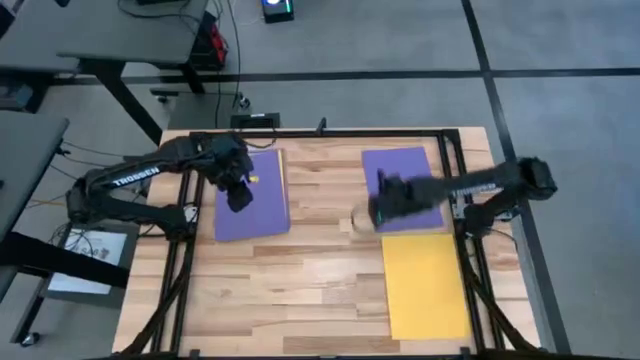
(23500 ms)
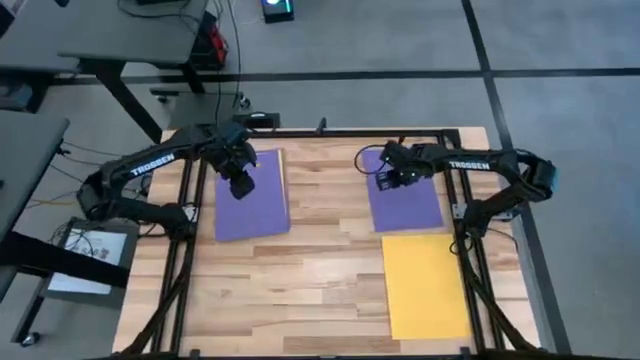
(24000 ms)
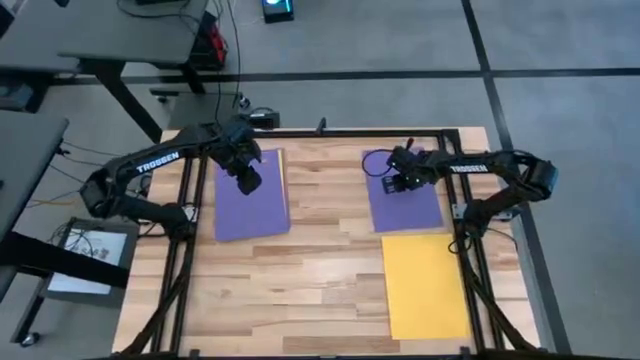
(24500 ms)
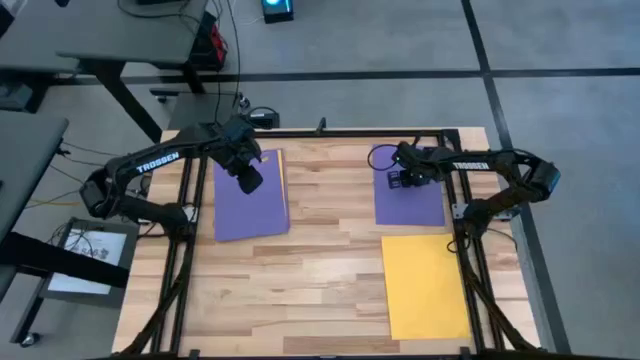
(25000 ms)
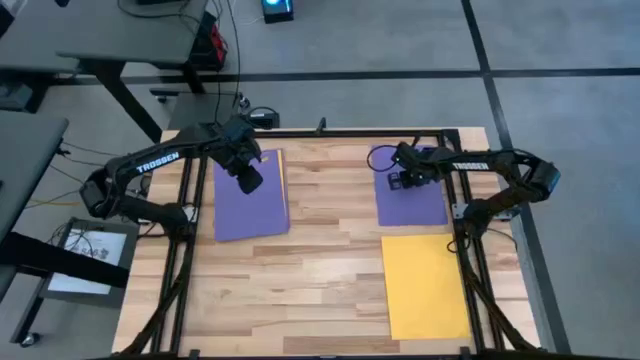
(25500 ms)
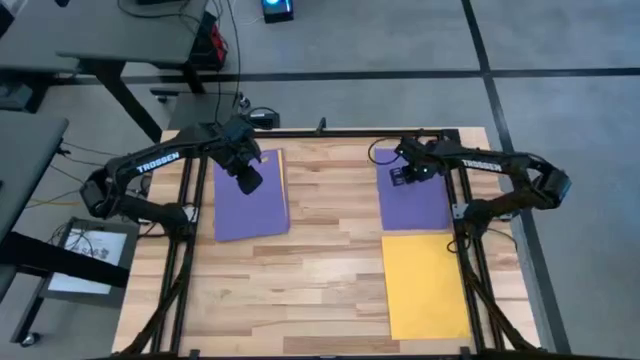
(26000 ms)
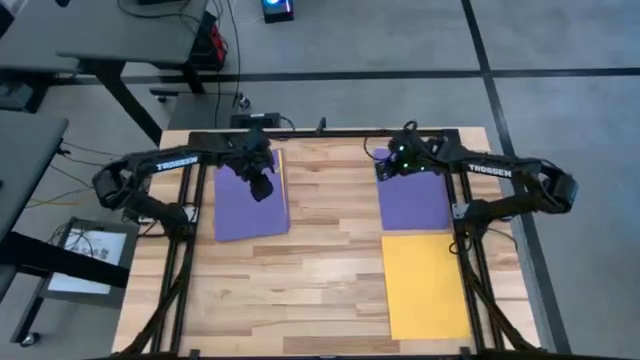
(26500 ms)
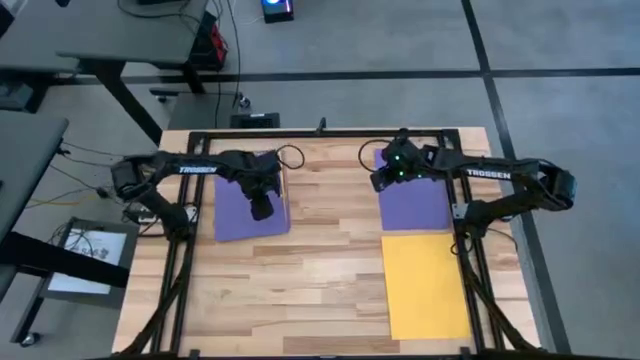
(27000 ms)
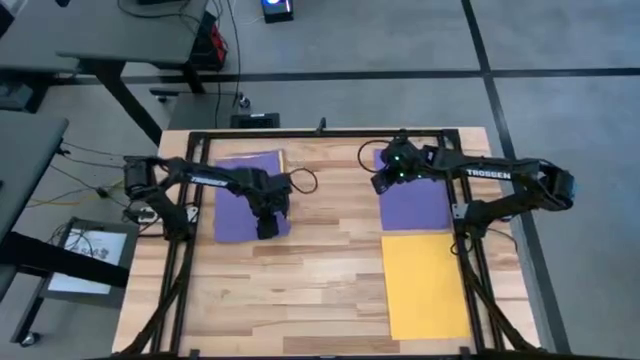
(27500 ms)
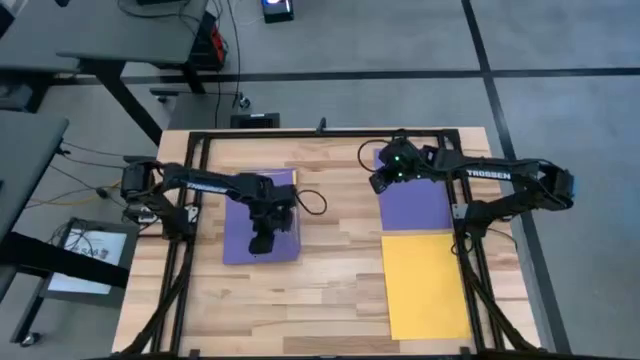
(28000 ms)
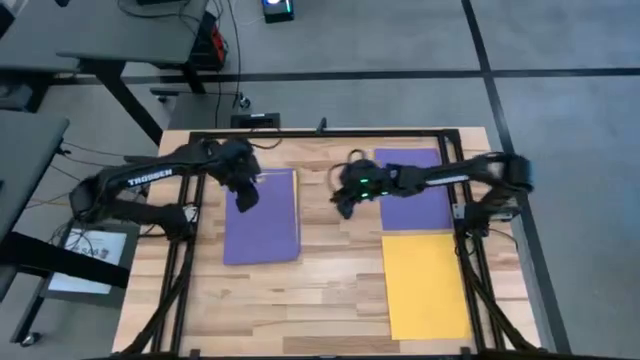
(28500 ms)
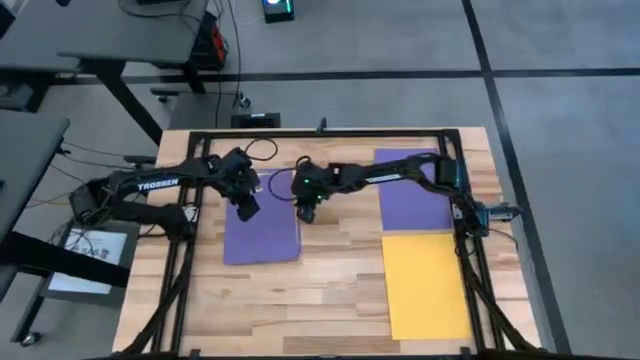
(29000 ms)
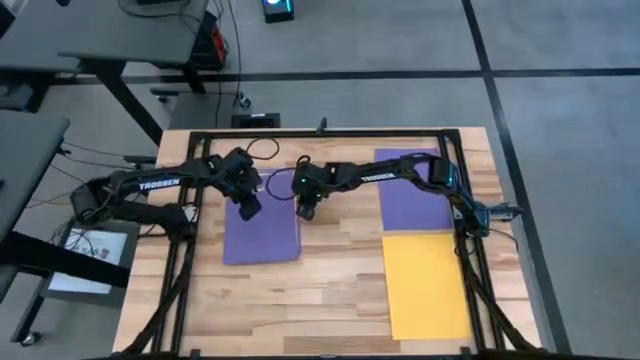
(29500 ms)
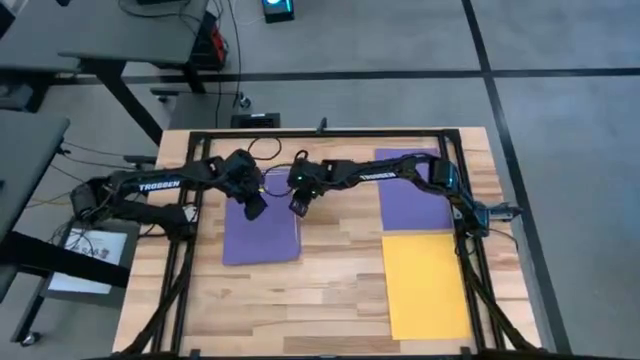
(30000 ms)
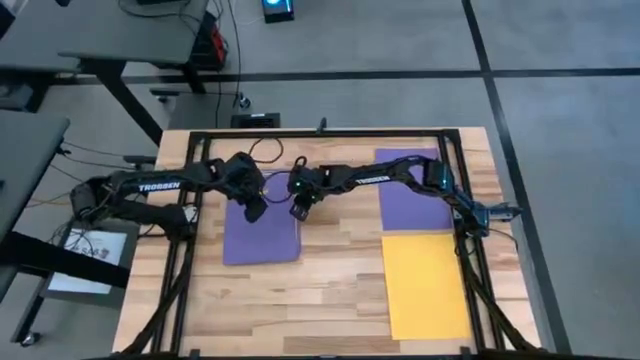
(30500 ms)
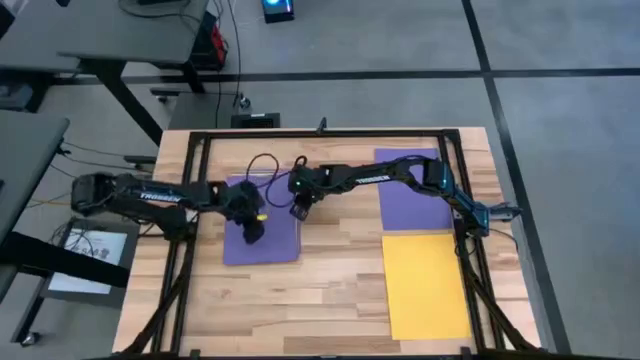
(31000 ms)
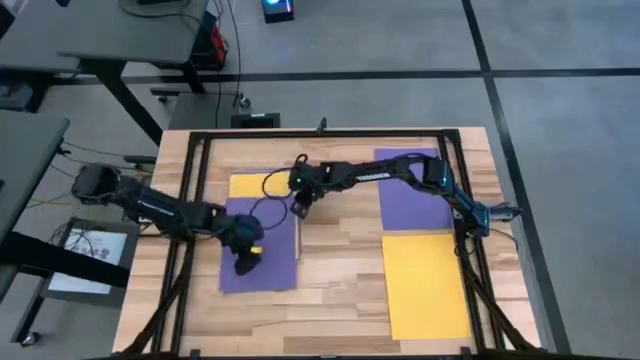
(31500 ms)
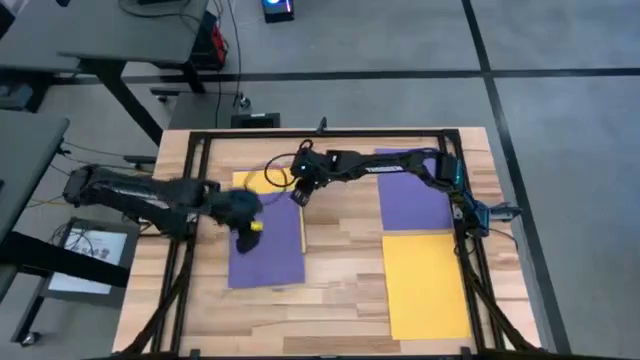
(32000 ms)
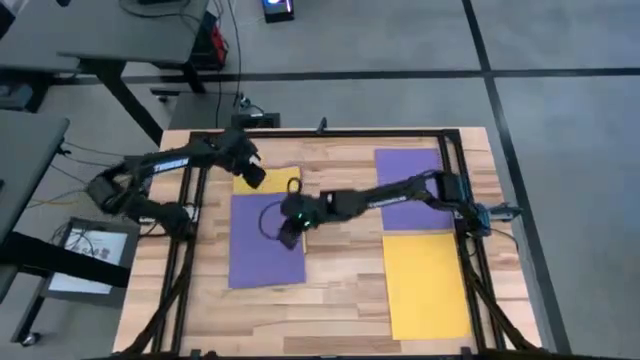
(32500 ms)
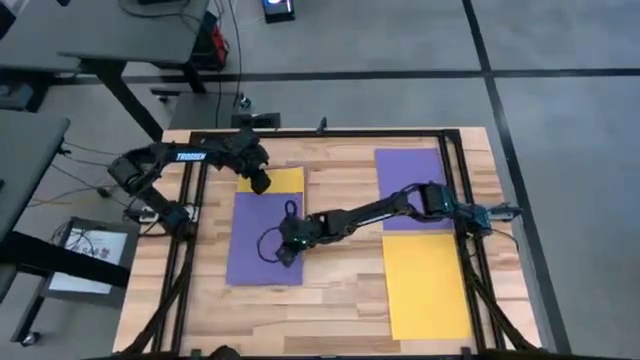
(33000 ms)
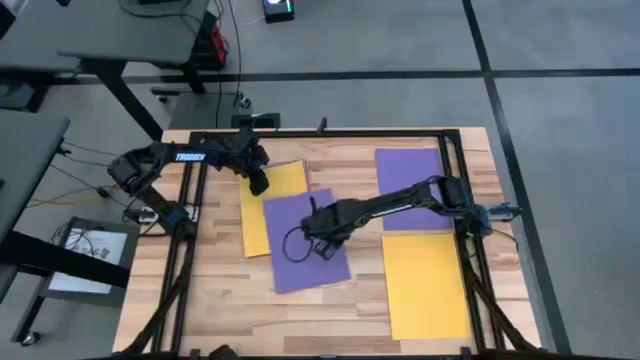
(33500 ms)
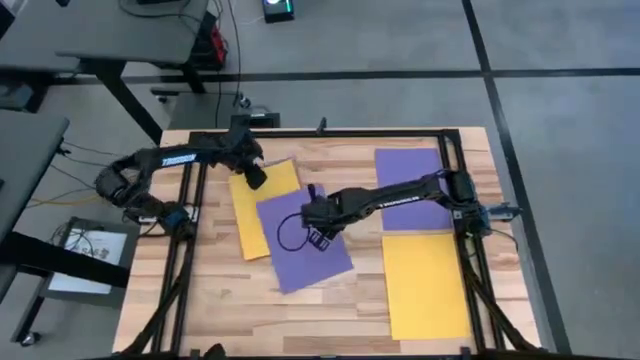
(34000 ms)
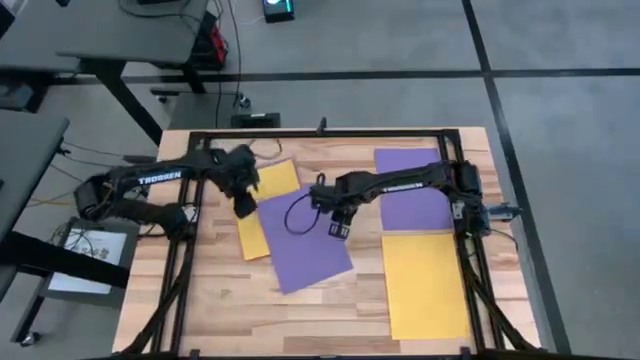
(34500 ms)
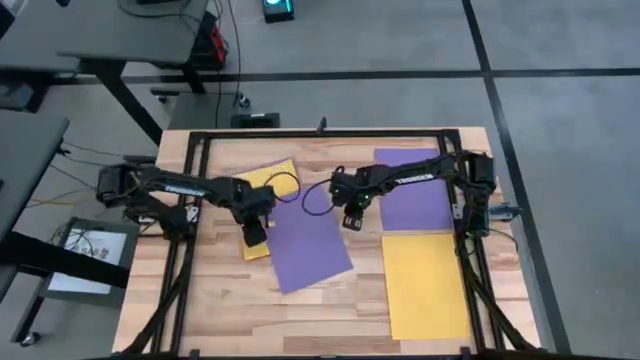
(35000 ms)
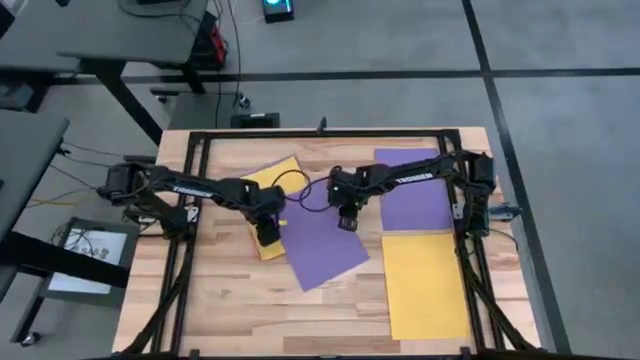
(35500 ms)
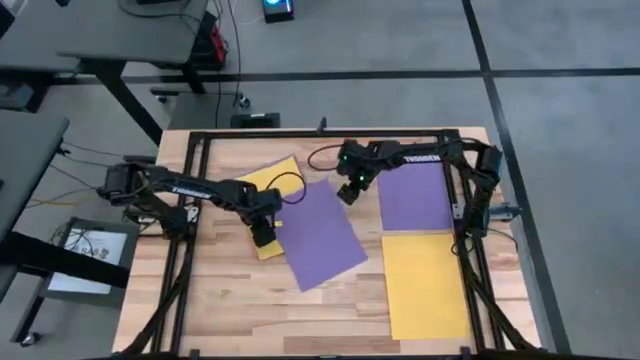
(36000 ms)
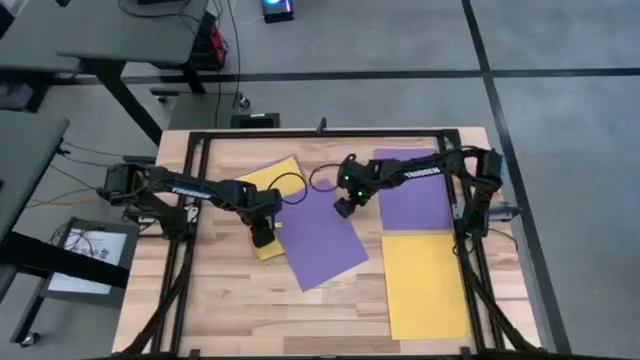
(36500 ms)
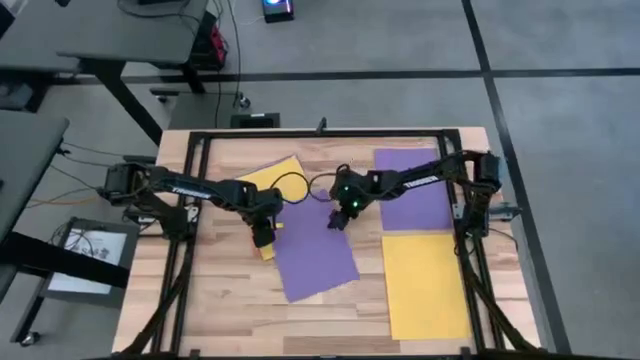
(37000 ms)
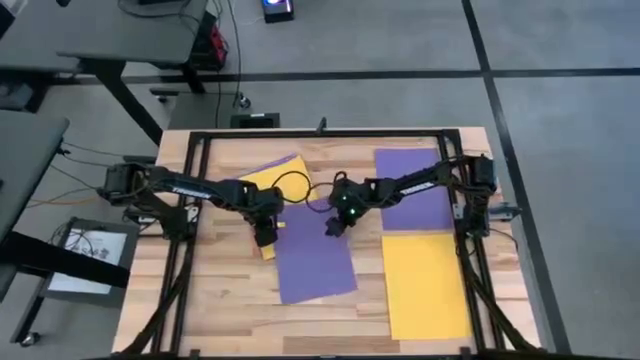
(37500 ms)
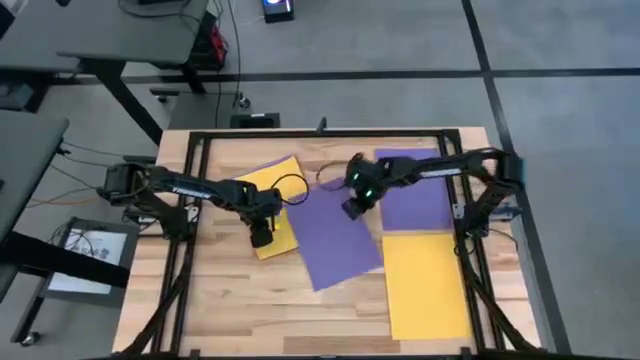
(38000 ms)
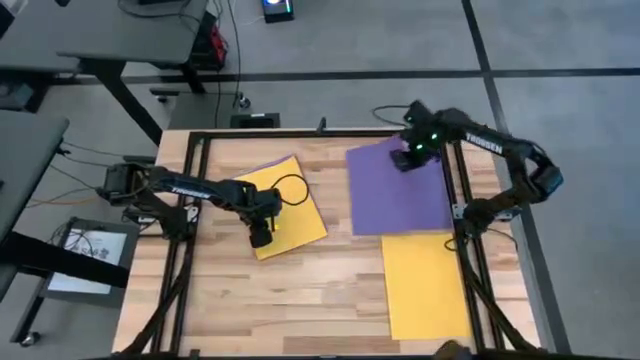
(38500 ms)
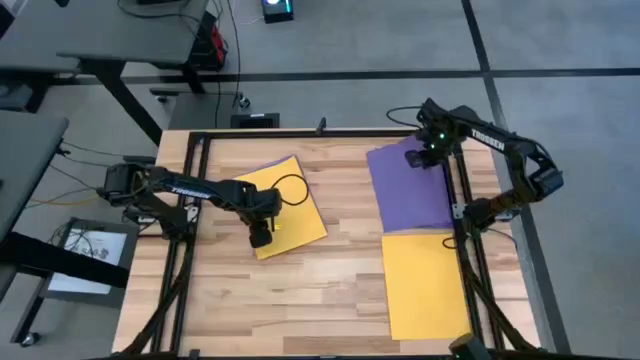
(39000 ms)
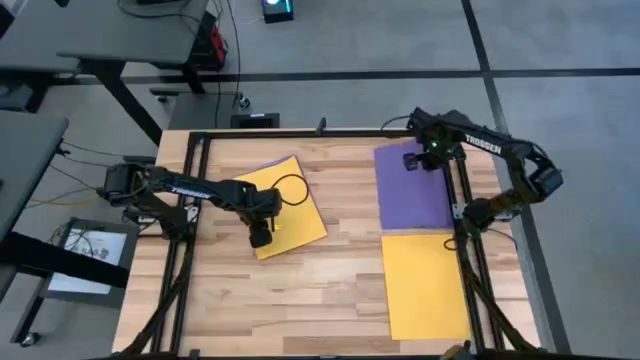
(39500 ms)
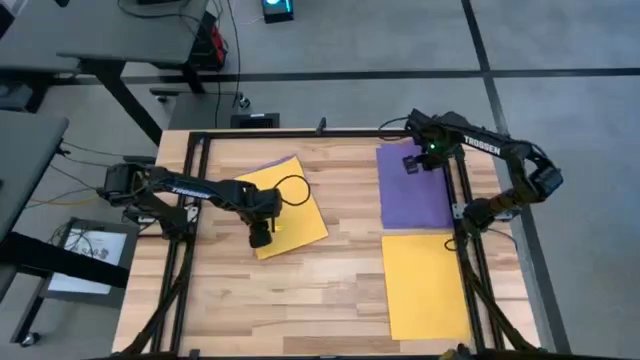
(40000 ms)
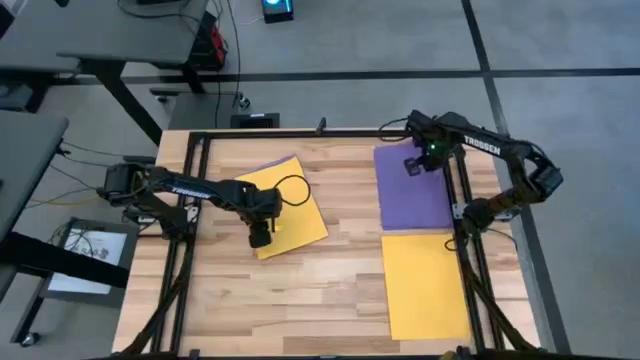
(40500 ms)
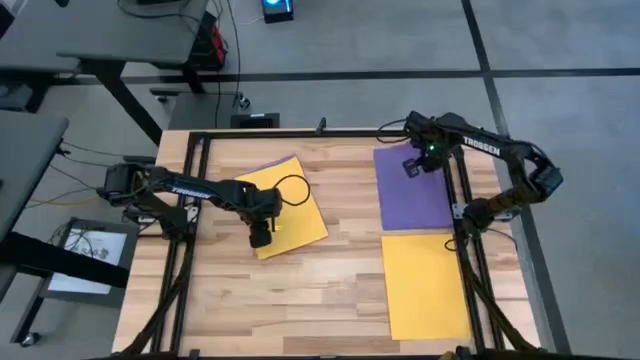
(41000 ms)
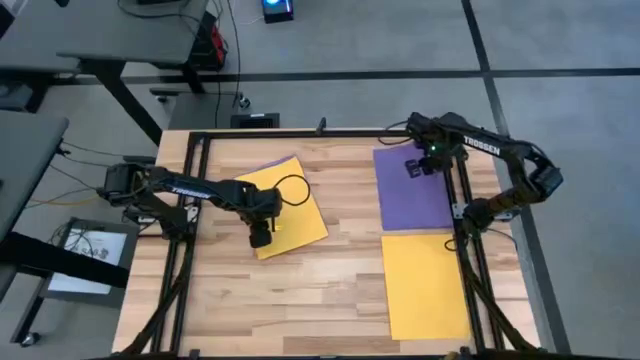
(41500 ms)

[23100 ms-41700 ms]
Task: Organize paper
Stack the purple paper on the top right purple paper

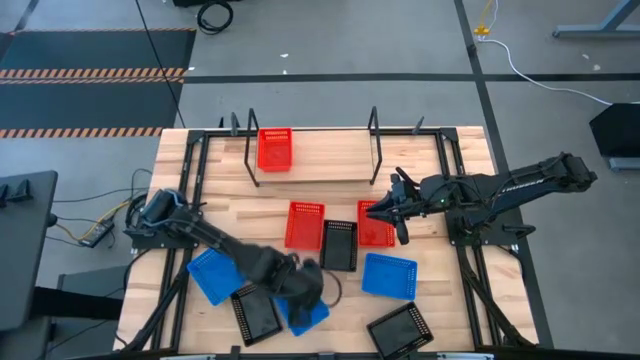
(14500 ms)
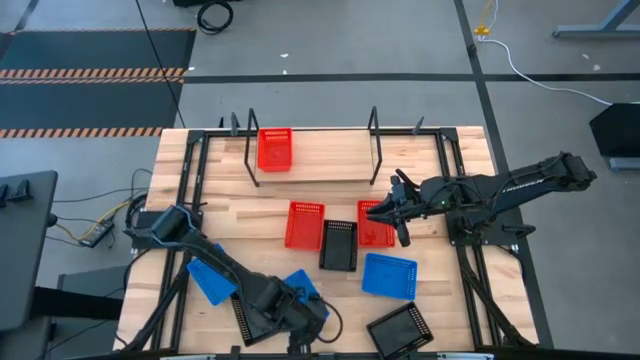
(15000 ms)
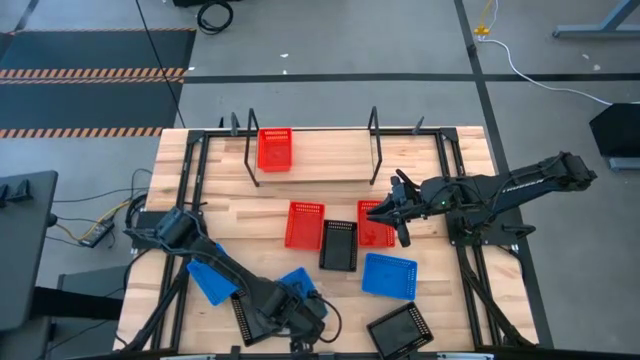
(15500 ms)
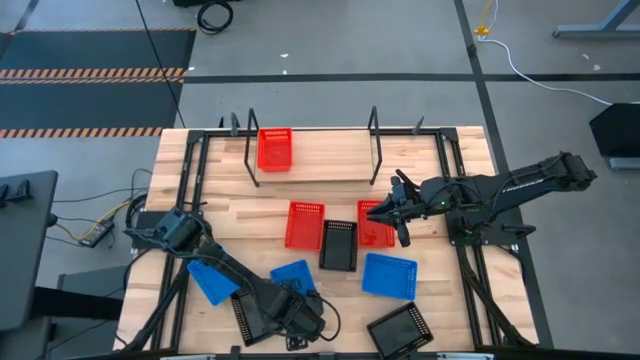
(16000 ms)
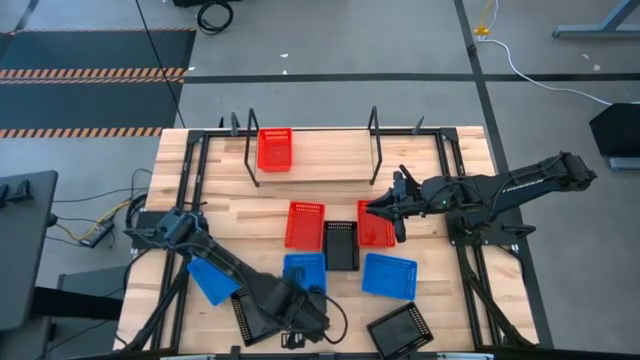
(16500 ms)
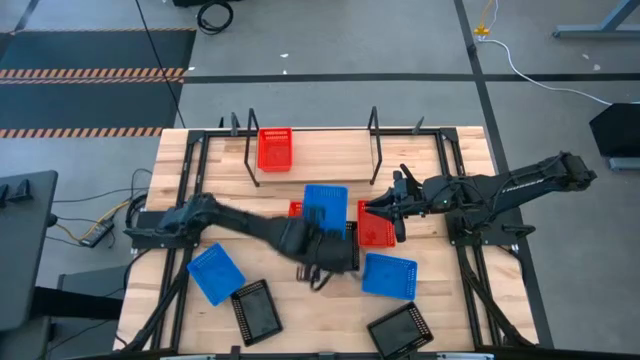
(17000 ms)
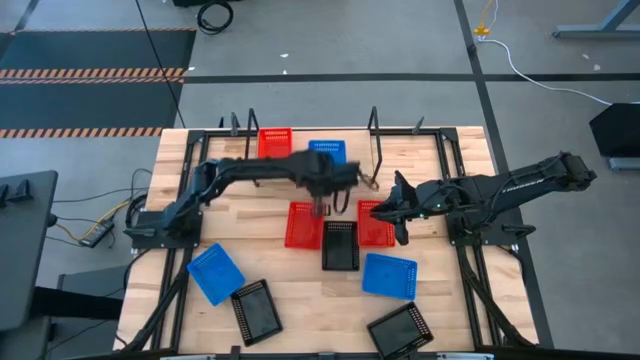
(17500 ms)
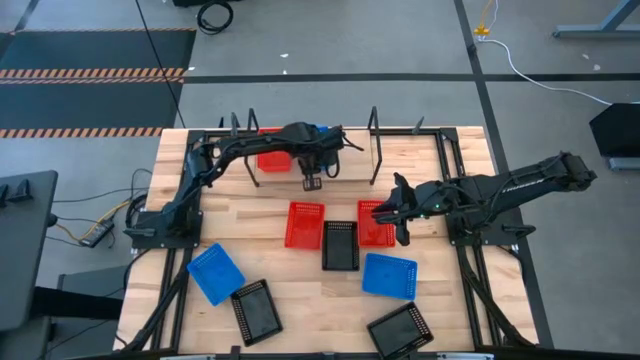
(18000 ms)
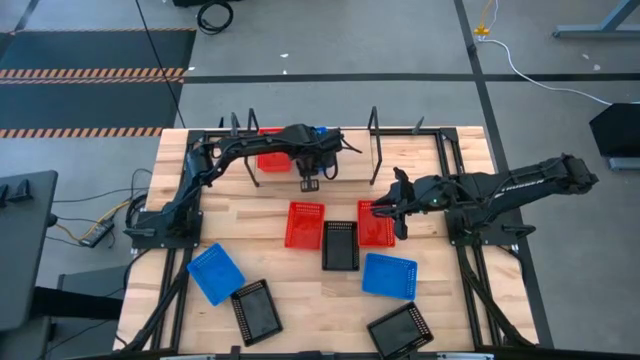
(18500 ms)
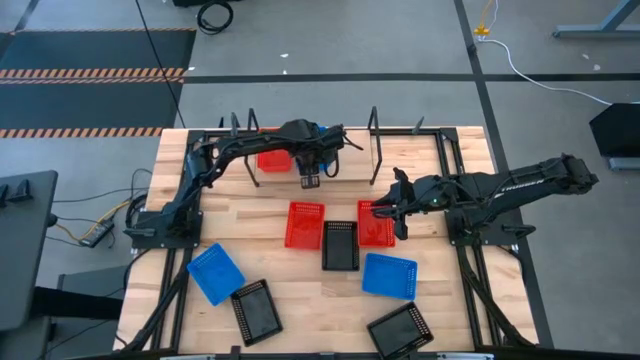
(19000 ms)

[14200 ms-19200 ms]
Task: Stack baskets on shelf by color
Put the middle blue bin on the shelf
